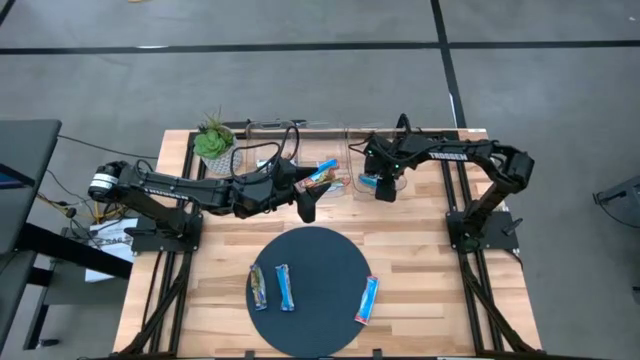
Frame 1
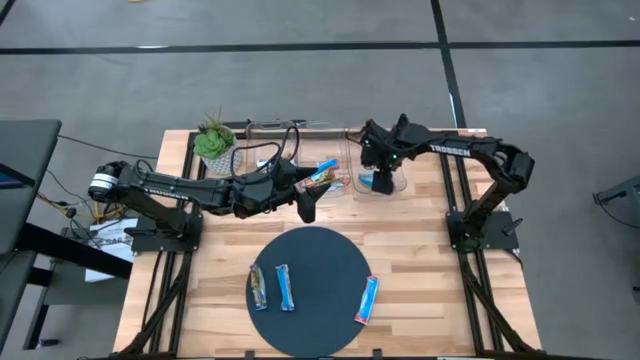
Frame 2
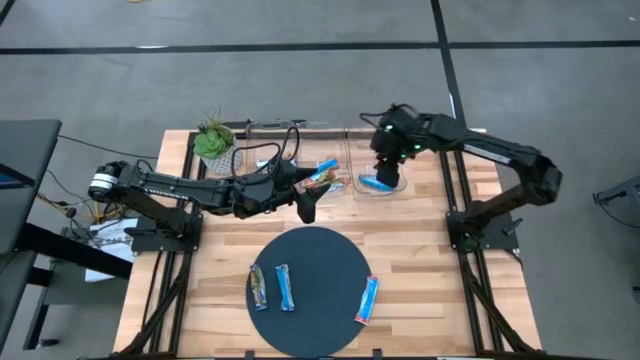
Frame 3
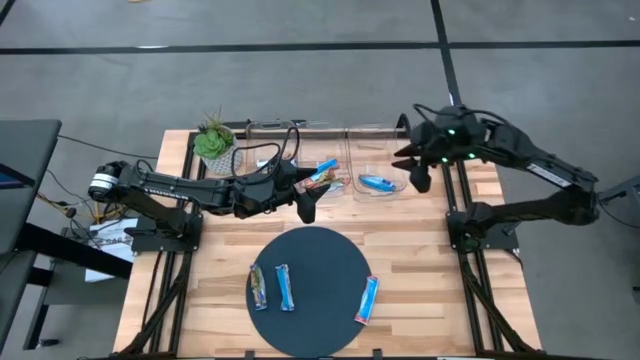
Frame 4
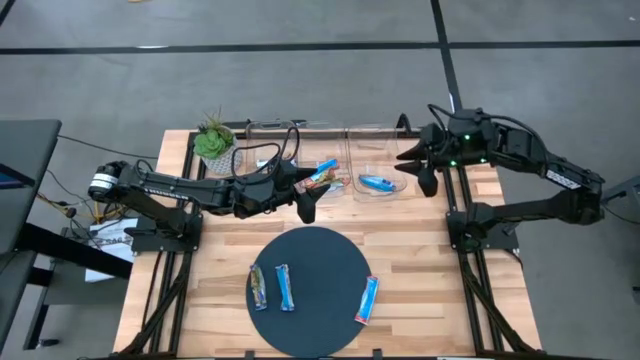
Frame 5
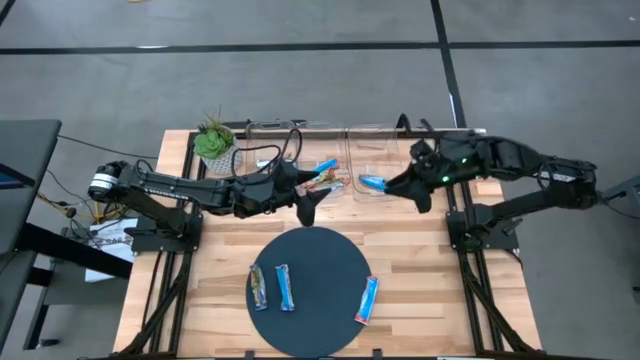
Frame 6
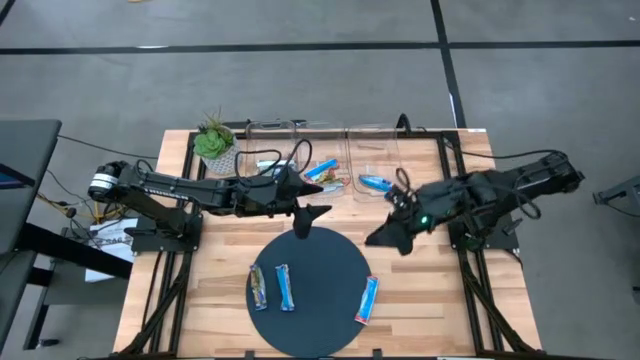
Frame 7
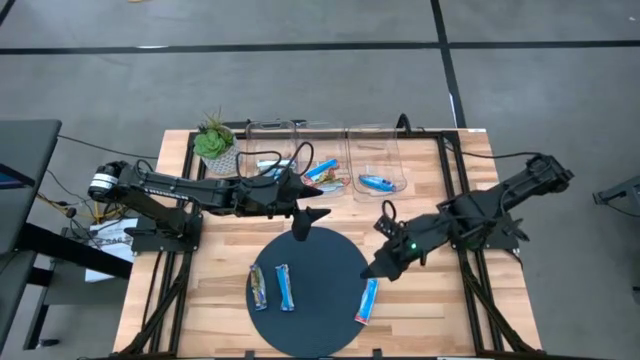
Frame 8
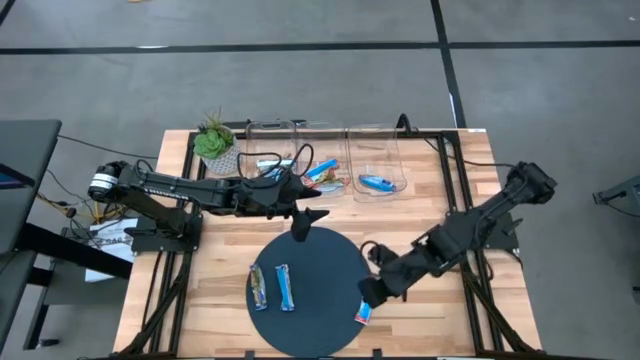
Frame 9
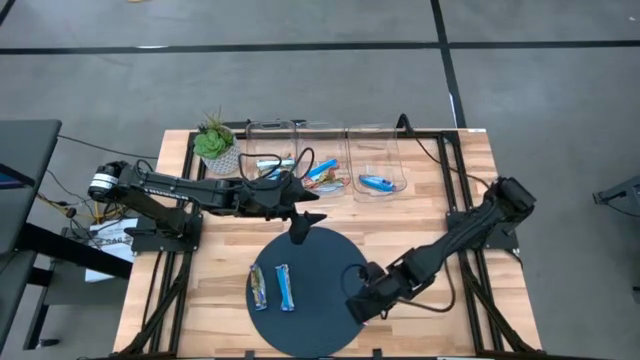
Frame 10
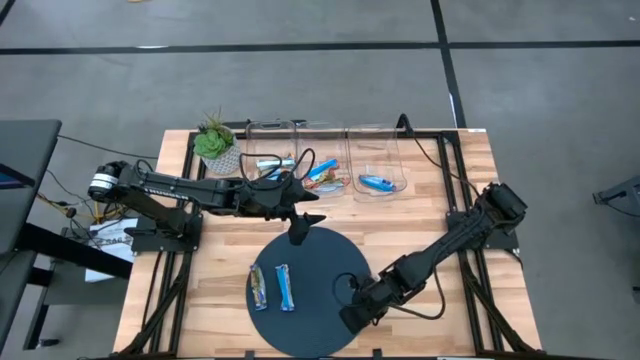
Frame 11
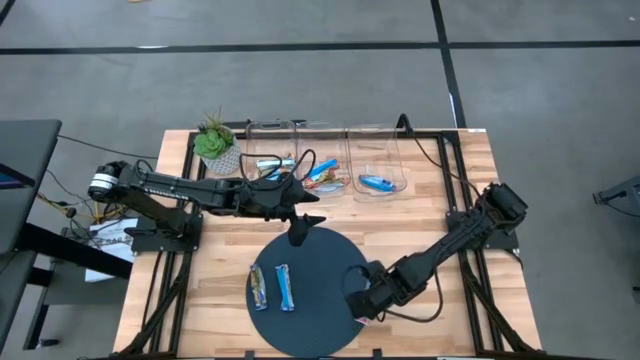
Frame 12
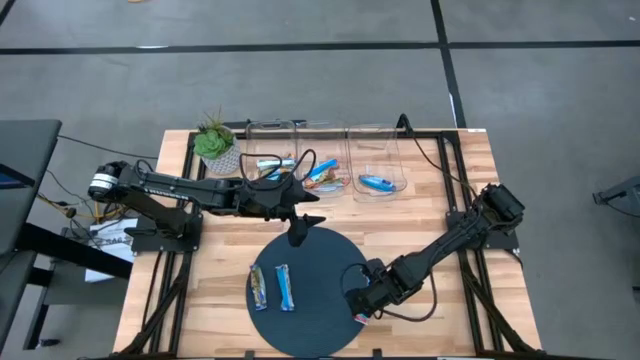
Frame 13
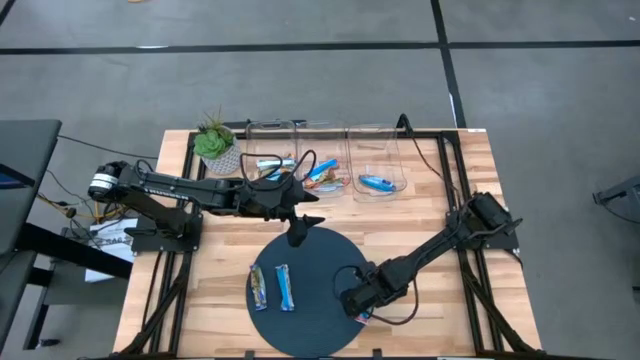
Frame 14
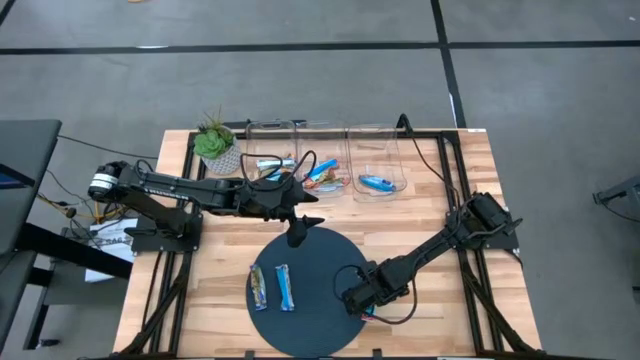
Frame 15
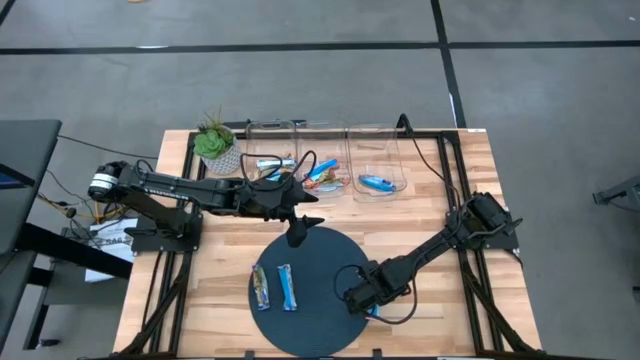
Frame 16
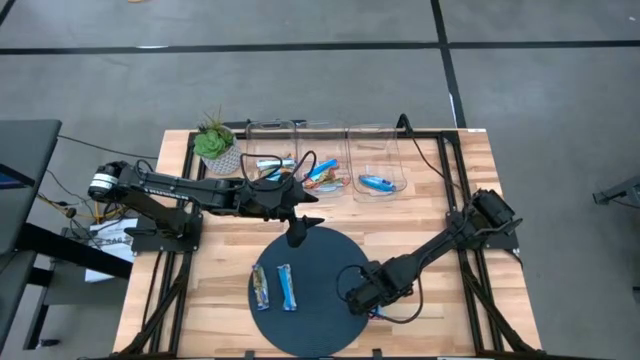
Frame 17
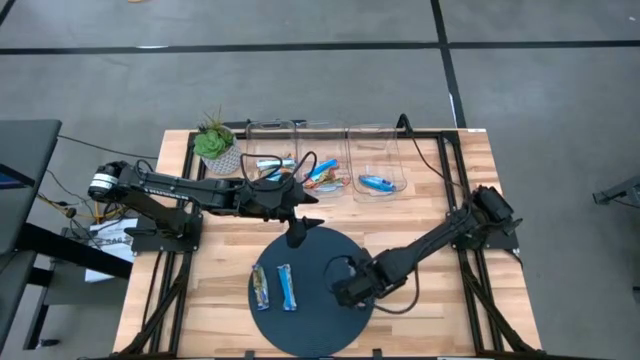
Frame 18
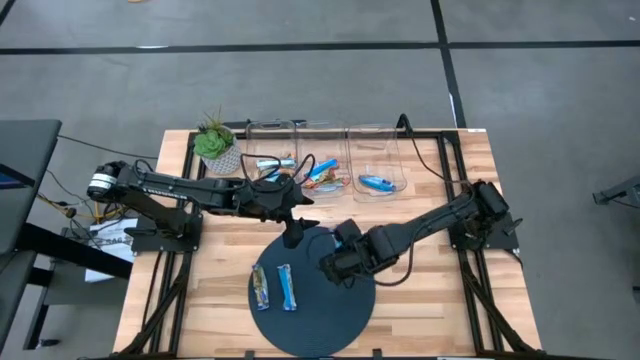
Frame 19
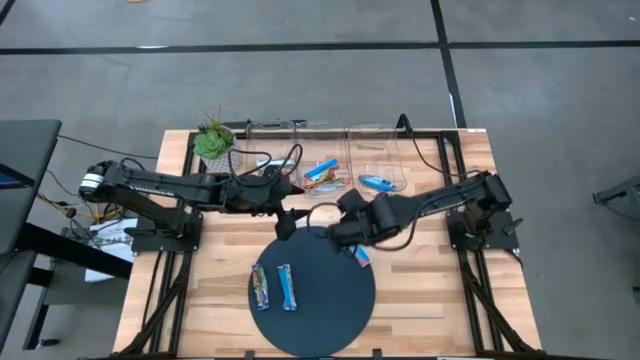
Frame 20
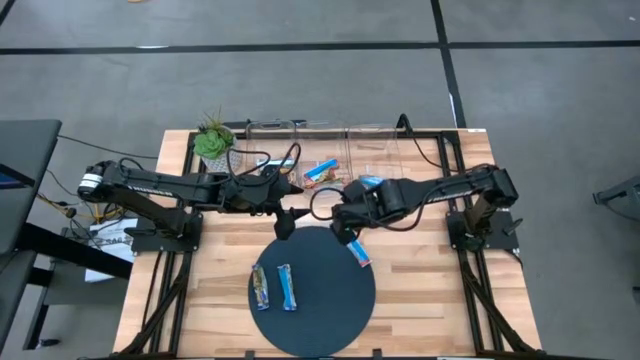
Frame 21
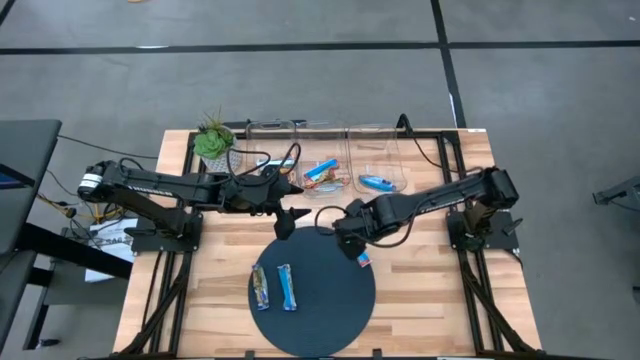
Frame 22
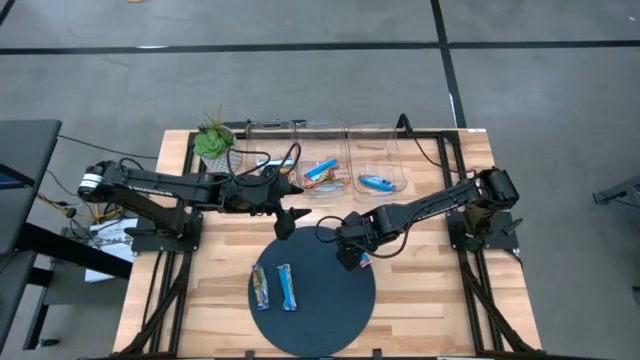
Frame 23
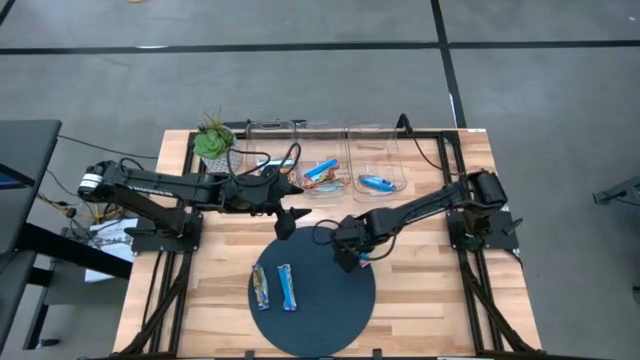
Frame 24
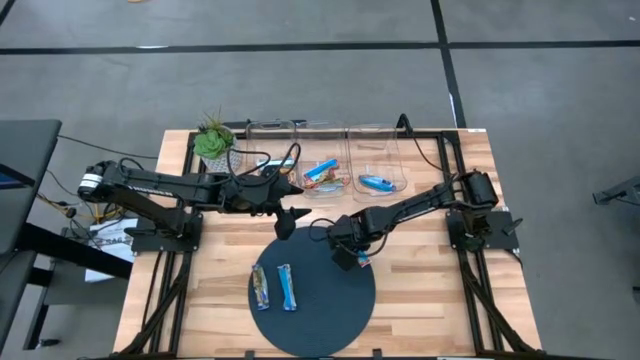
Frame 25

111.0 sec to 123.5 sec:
Task: Pick and place Granola Bars by type
Put the red bar into the center transparent bin

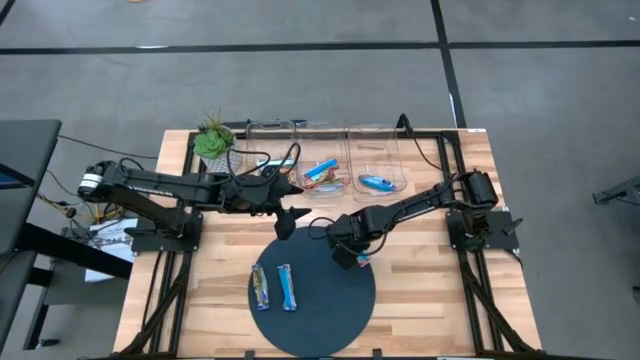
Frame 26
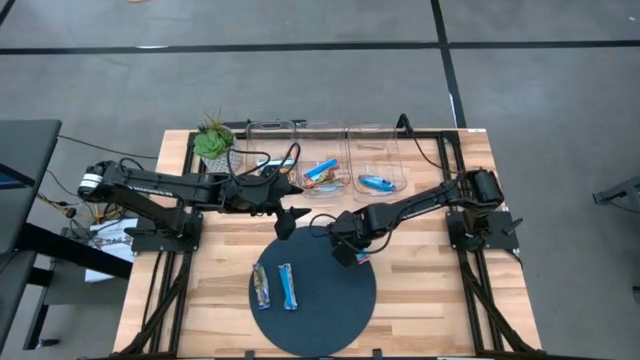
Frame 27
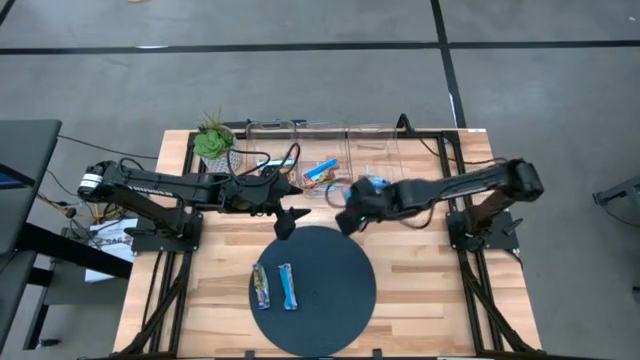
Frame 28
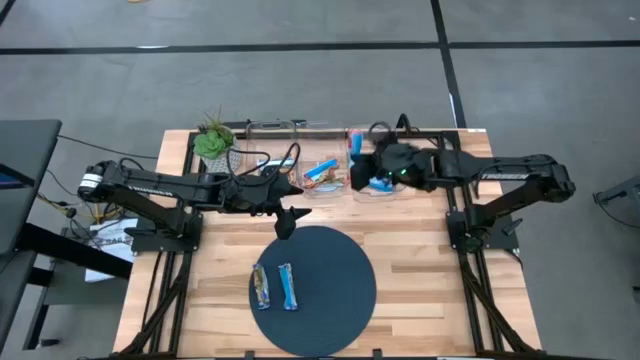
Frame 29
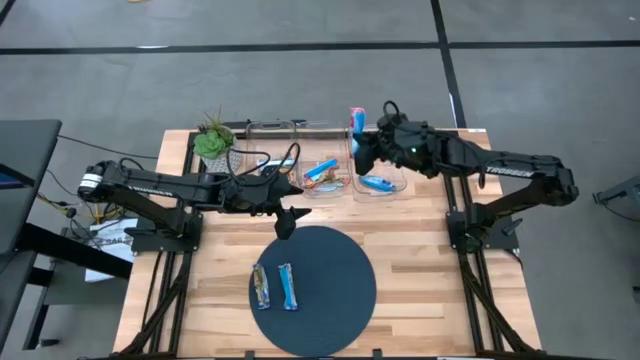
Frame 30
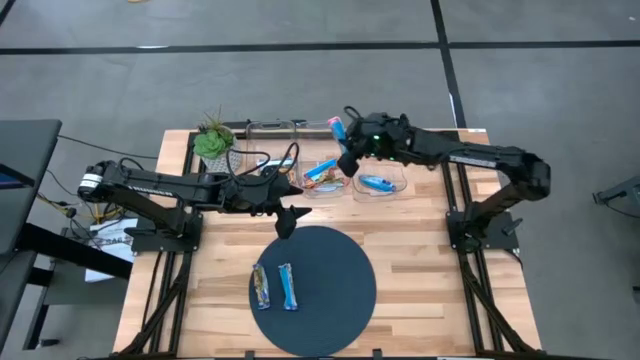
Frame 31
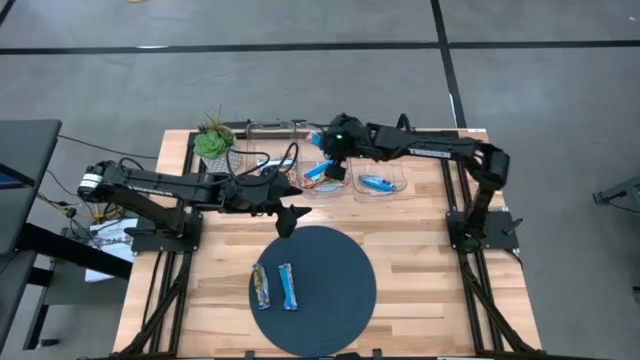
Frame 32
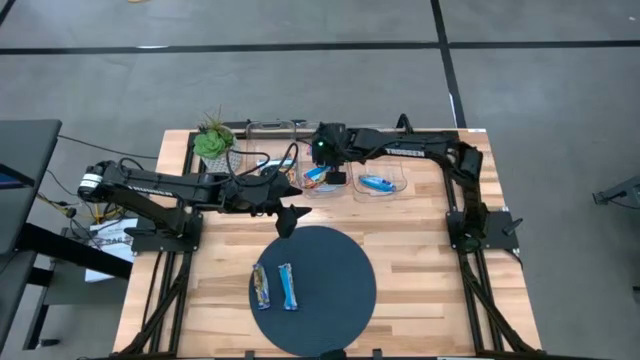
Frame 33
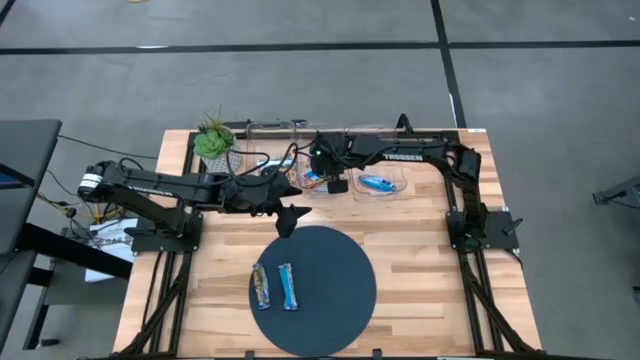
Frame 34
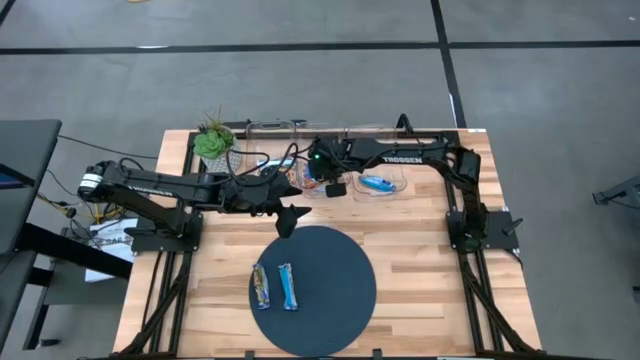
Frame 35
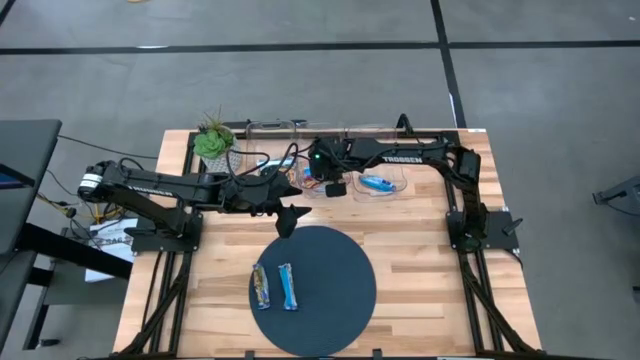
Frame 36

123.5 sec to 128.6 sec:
Put the red bar into the center transparent bin

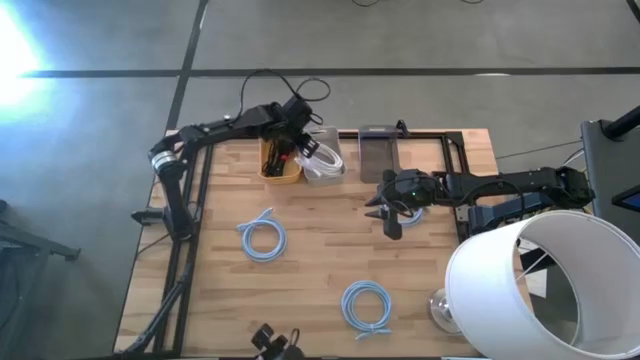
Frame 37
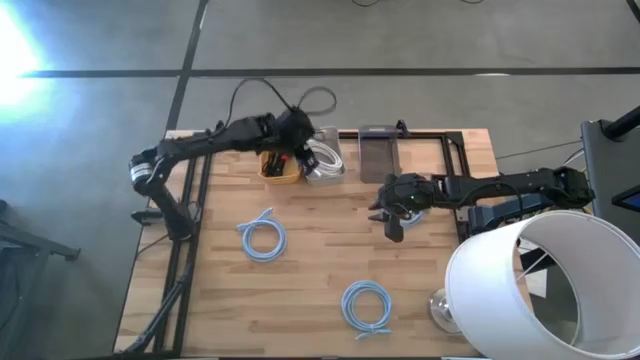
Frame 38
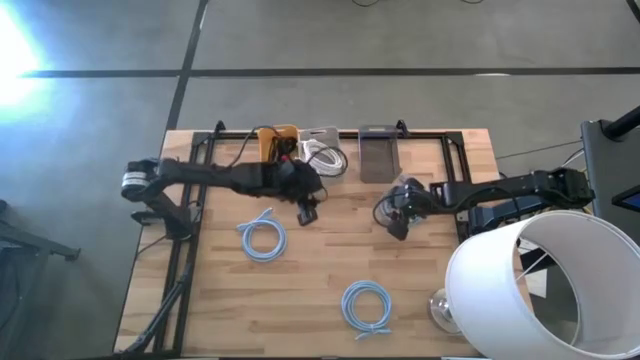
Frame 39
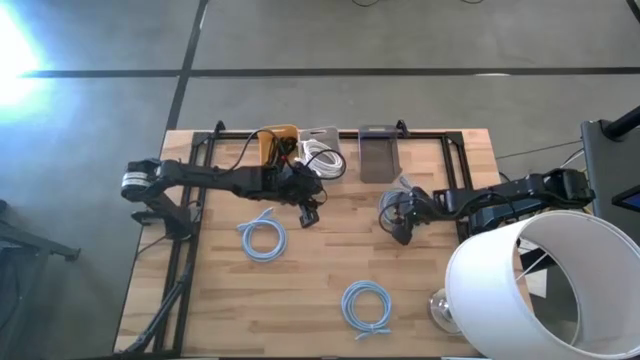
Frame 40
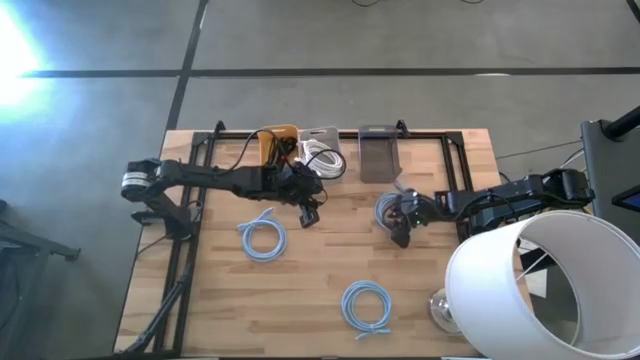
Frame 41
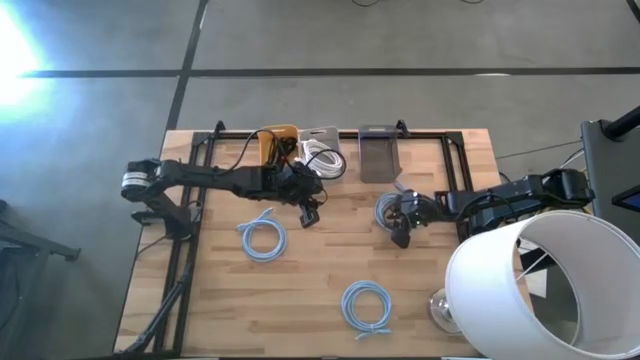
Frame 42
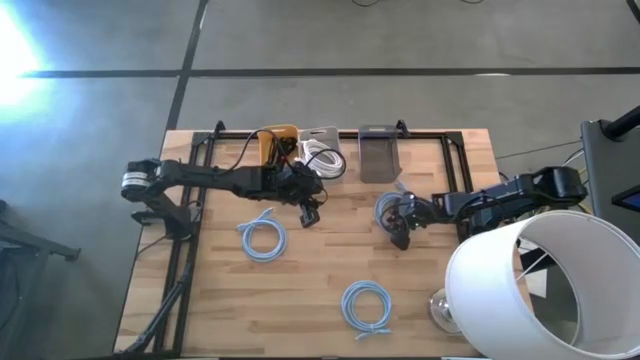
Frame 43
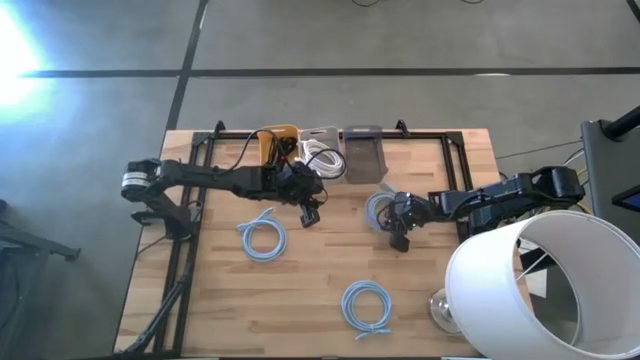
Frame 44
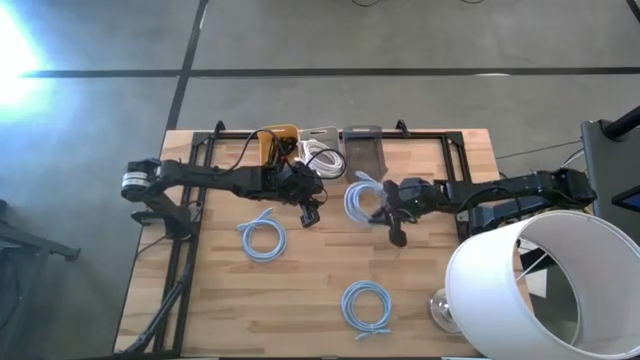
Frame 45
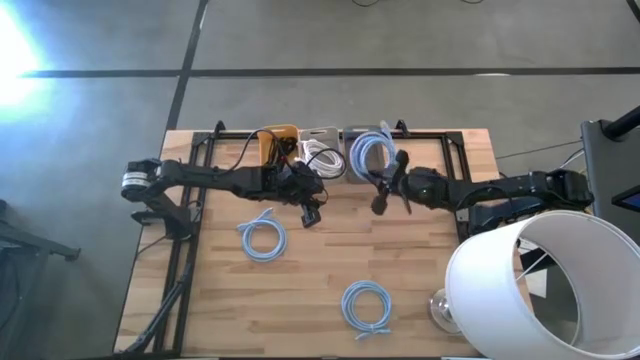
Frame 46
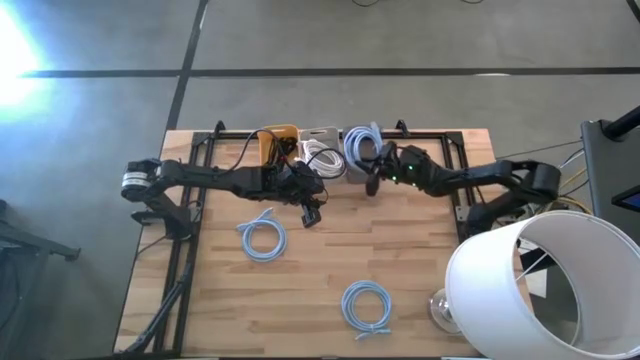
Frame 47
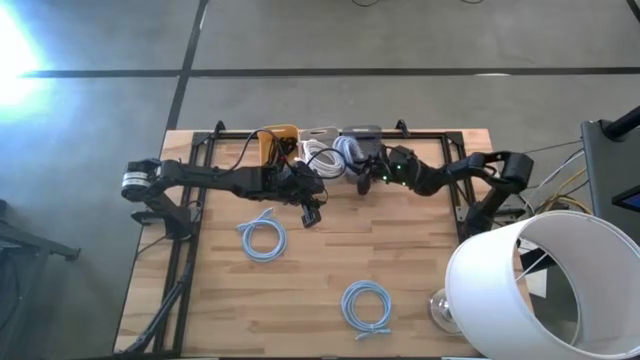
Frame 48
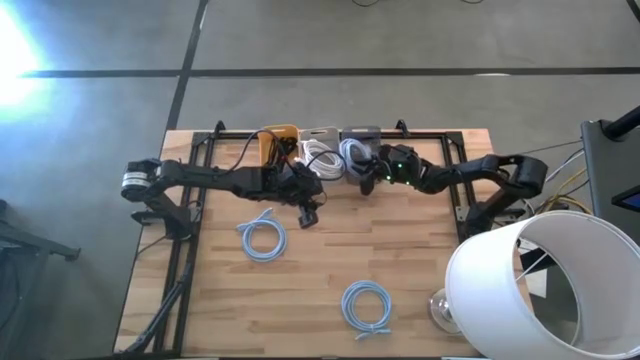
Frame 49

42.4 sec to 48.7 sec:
Task: Pick & Place USB Port
Put the top right blue display cable into the black bin
